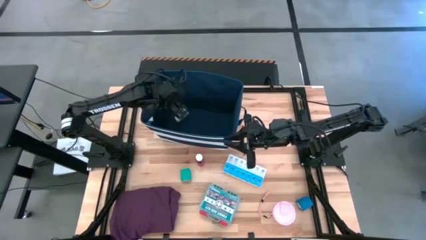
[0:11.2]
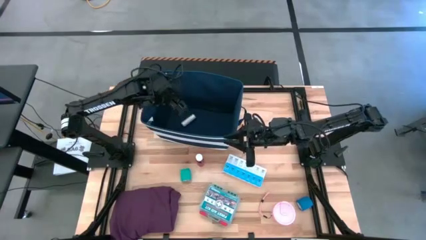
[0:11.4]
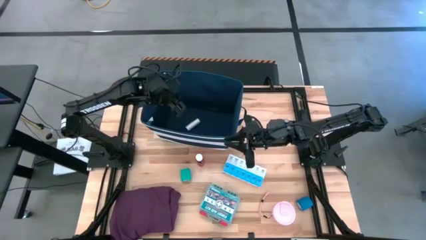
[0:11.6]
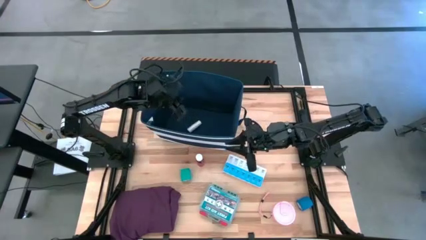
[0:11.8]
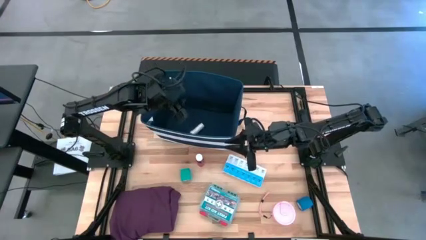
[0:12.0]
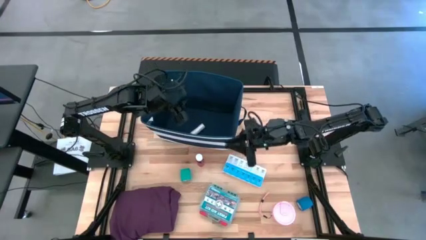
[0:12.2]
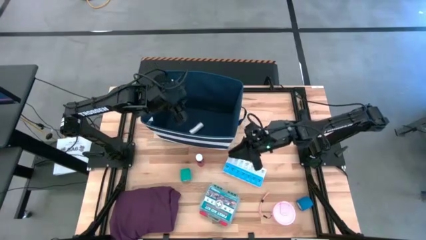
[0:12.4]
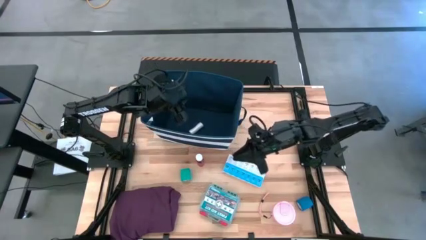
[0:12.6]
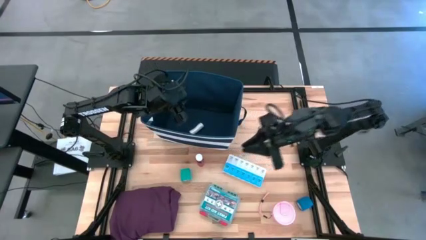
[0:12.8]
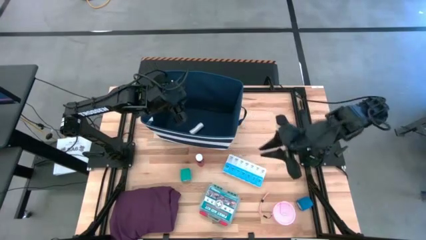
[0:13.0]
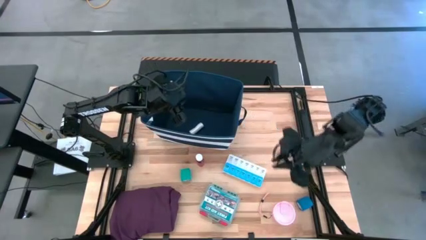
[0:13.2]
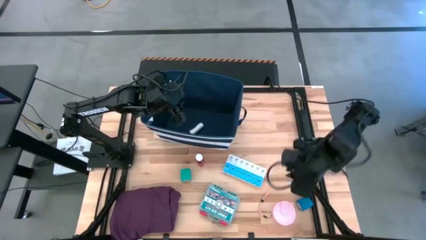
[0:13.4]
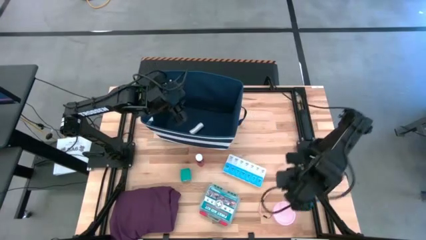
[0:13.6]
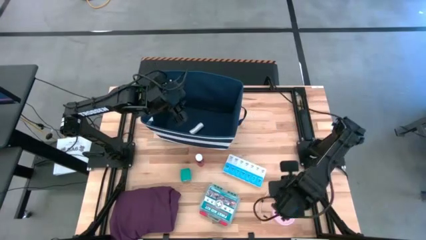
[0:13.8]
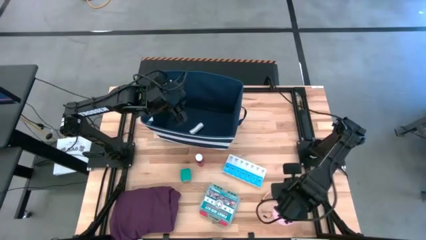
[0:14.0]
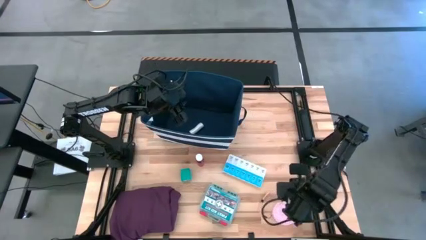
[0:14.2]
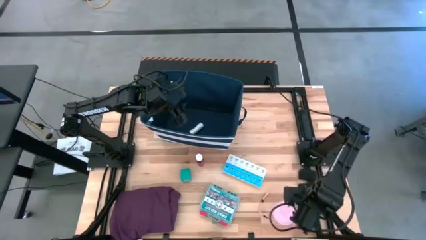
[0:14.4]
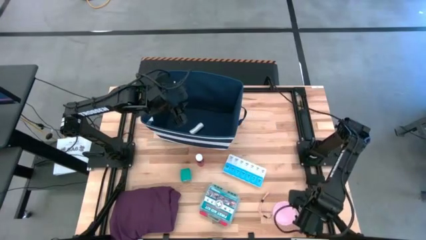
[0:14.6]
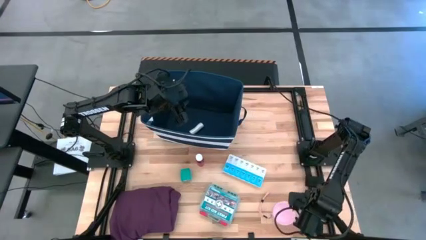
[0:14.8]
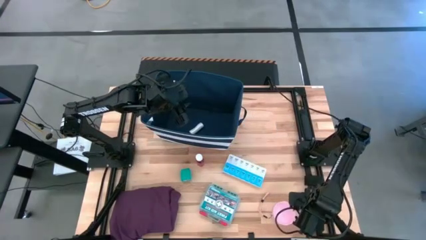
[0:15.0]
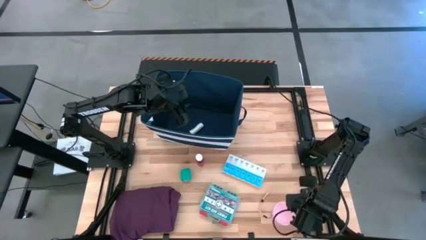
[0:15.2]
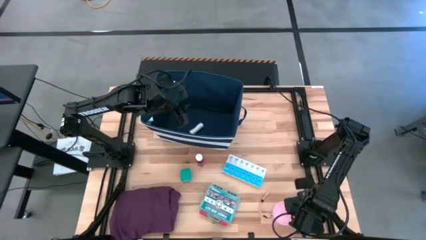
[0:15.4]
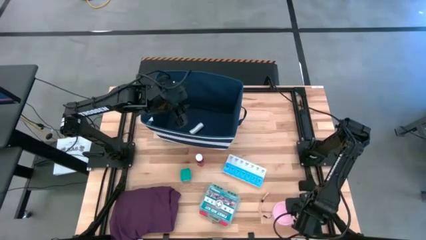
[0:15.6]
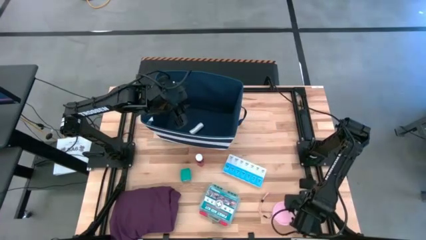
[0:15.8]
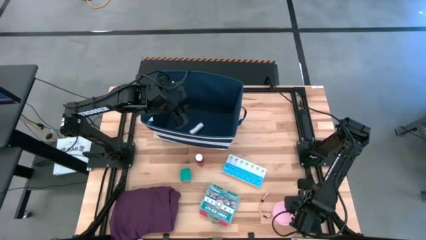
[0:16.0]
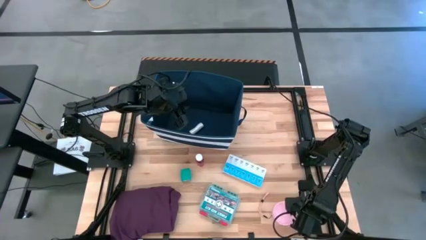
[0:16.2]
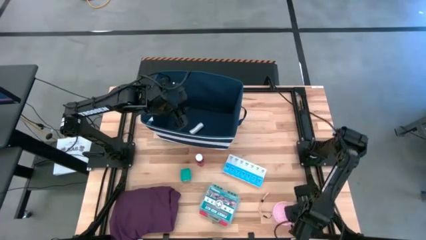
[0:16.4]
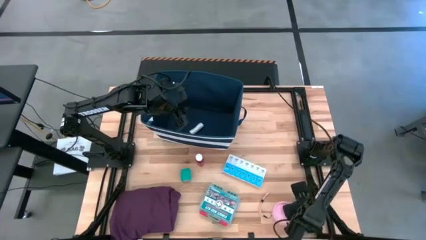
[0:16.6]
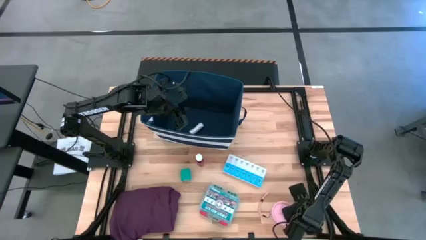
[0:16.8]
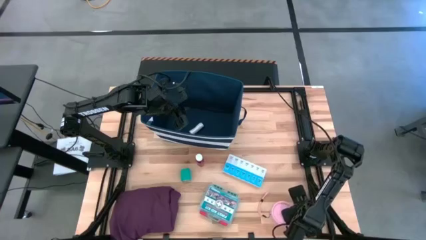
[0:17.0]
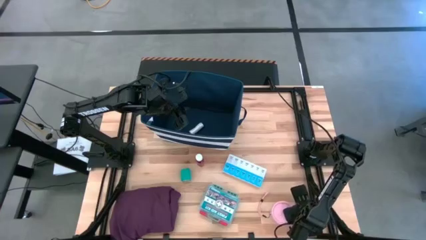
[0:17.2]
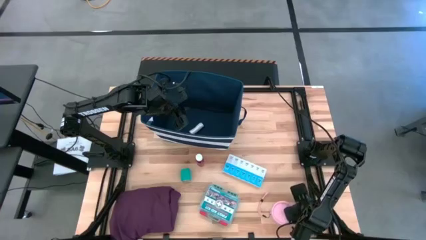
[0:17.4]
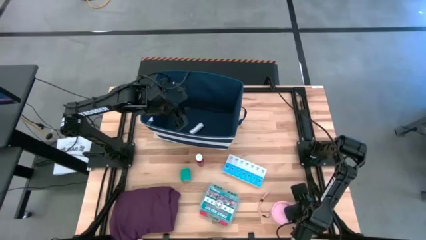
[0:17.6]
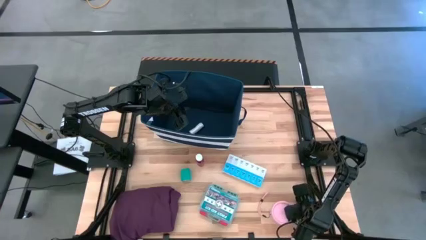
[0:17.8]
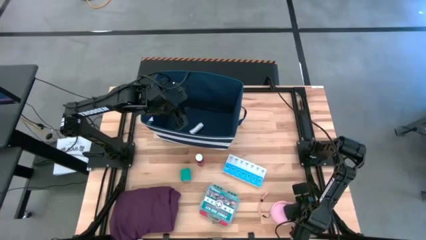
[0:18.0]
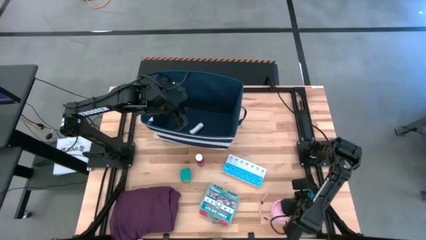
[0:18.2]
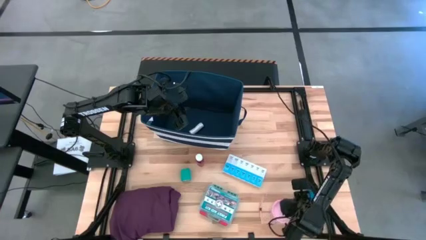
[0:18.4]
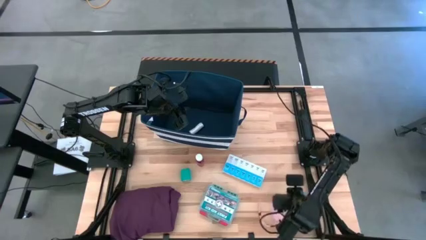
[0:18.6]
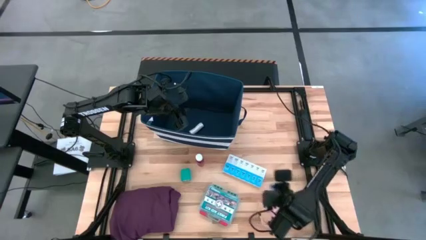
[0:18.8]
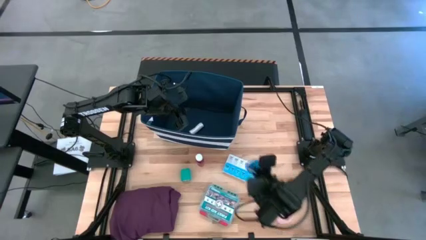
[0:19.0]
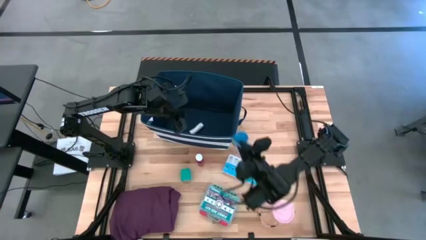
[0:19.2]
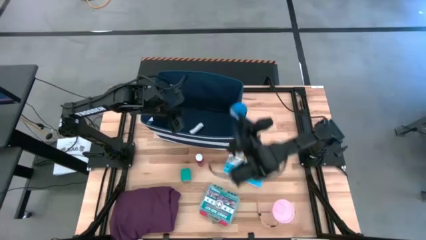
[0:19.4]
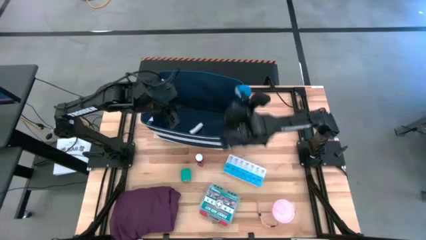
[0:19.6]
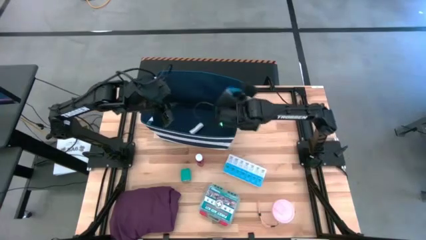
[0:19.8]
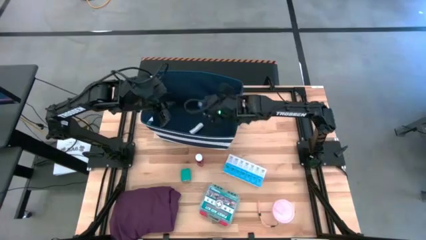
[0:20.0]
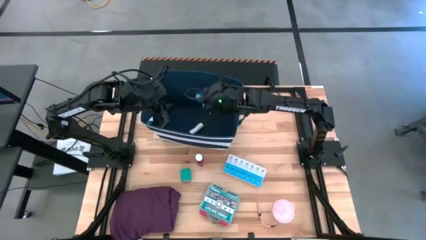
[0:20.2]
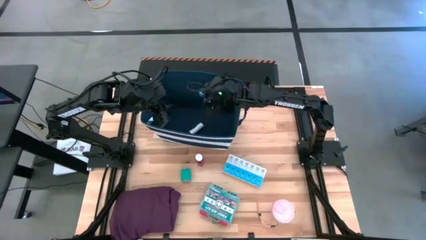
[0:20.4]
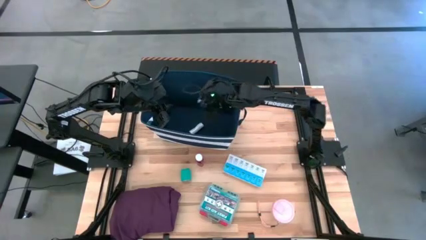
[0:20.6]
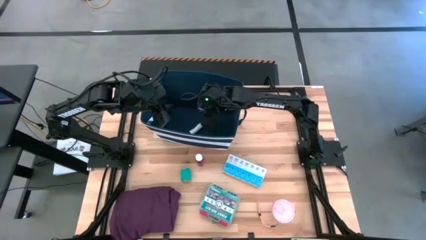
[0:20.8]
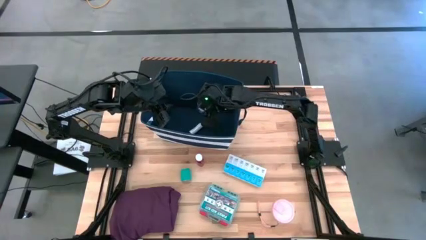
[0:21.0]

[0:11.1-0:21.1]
Task: Pick & place medical supplies in basket/bin
Put the blue bandage into the blue bin

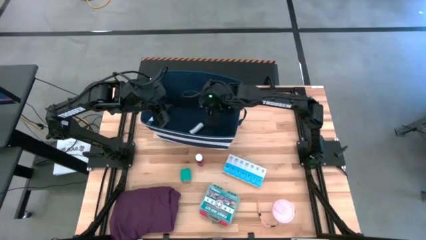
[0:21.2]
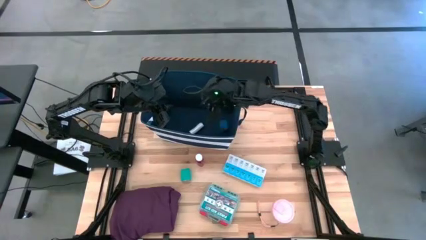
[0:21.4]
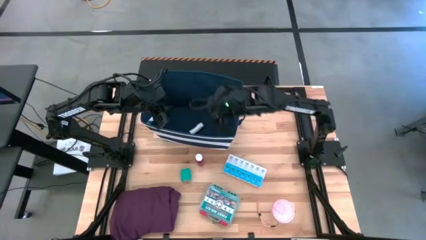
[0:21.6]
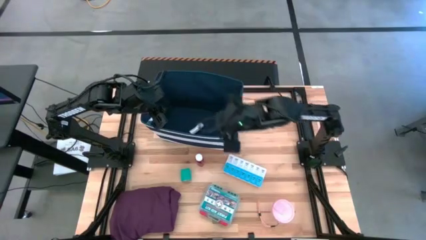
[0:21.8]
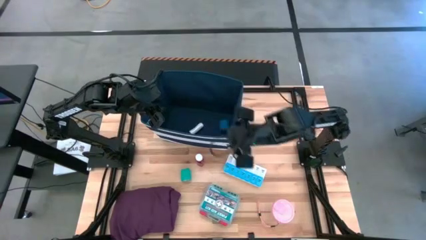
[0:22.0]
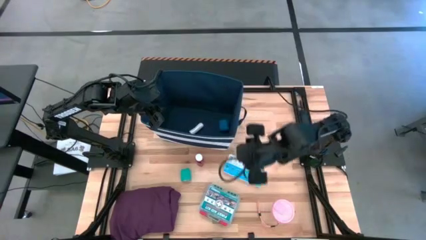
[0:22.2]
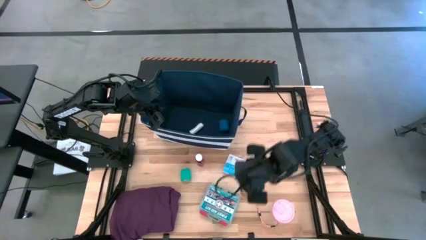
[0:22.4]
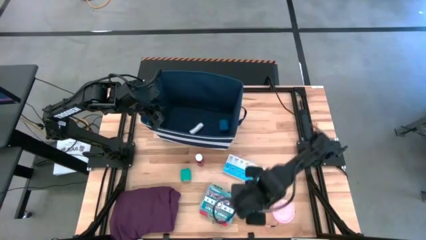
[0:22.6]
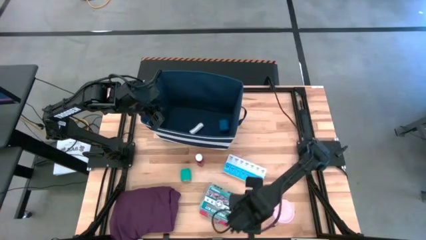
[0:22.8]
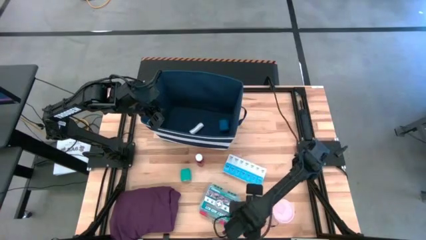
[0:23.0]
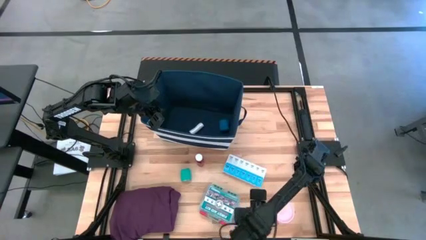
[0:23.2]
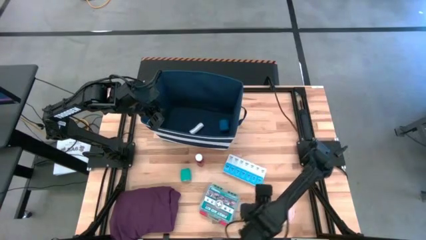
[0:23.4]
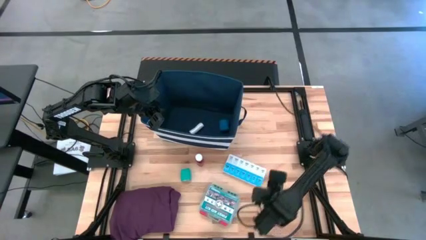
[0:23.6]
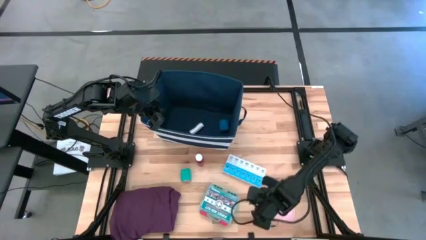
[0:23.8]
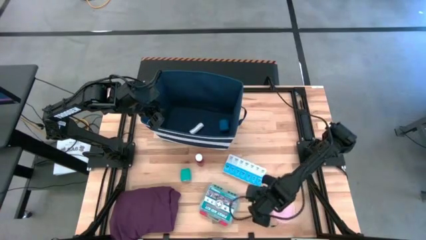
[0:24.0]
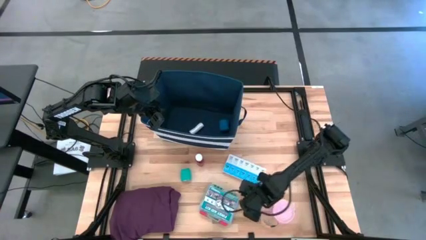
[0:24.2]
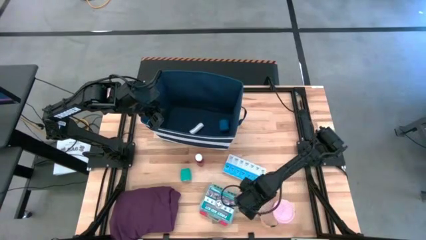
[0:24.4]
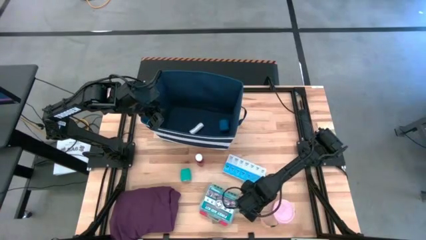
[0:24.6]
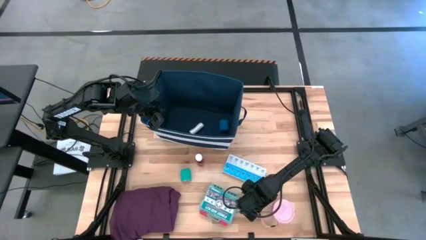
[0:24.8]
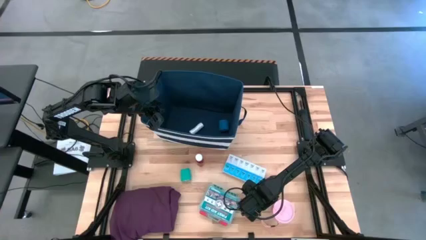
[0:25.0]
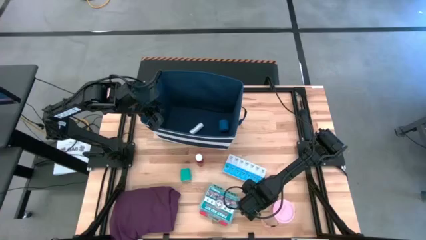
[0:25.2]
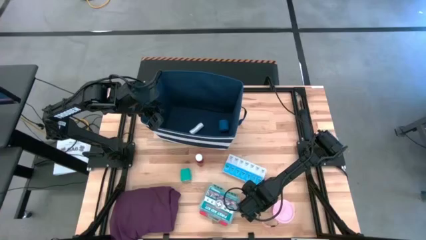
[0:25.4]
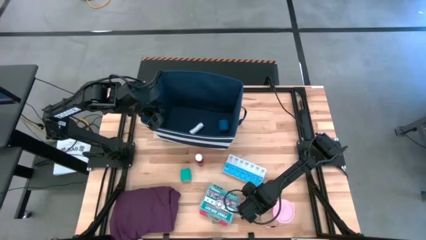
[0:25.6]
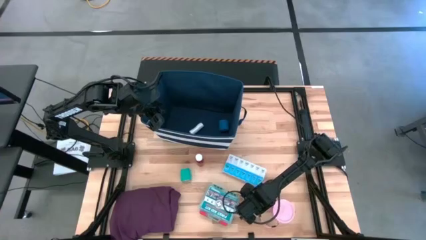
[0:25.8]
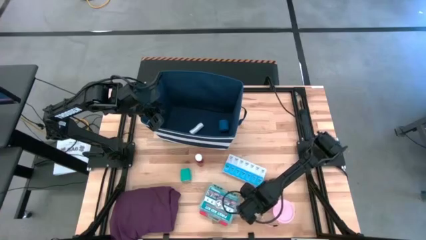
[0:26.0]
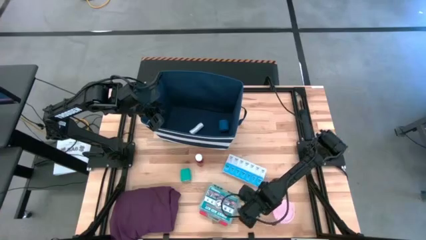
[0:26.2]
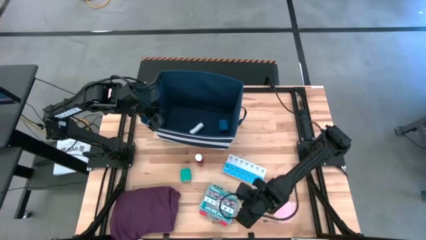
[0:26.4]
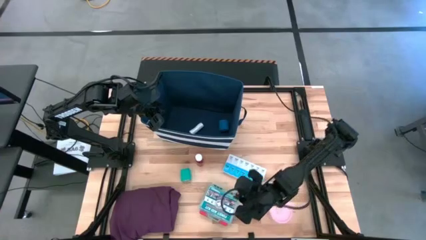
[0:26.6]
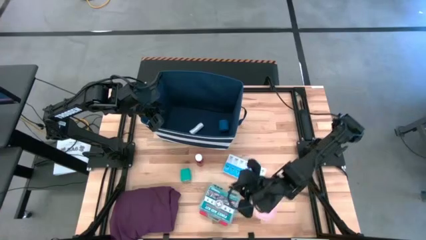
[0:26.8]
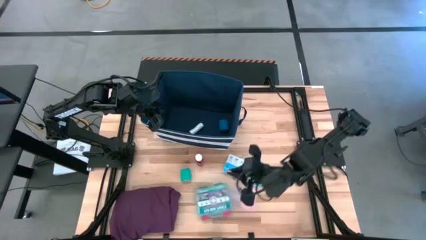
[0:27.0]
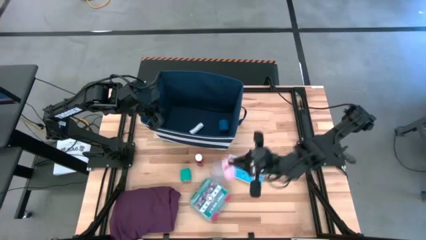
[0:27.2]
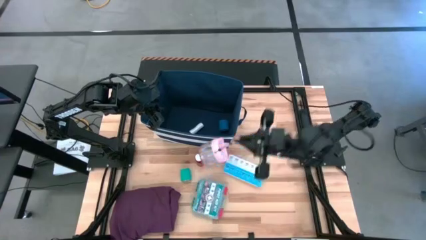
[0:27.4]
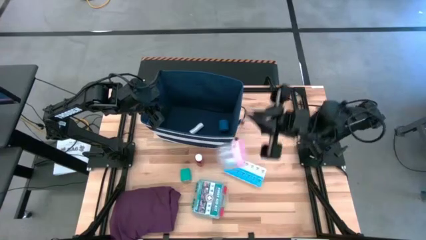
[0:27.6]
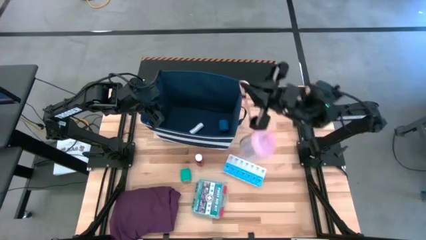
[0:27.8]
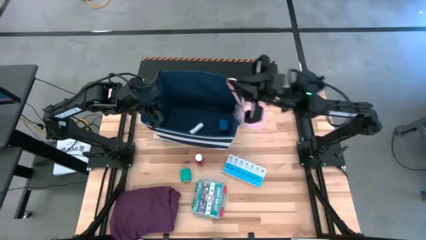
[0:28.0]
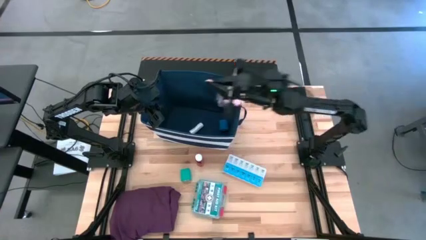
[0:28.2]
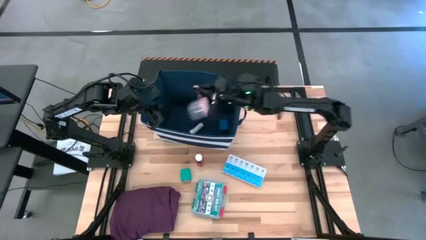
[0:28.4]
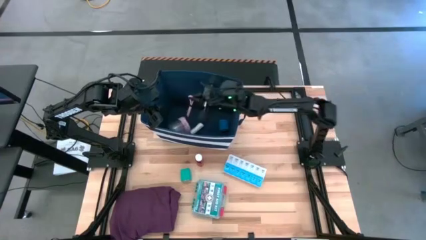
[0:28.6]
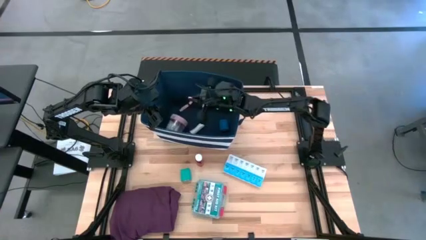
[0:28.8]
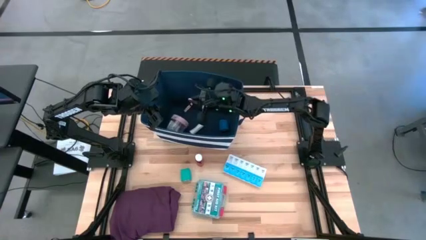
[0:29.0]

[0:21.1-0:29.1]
Put the pink pill dispenser into the blue bin
